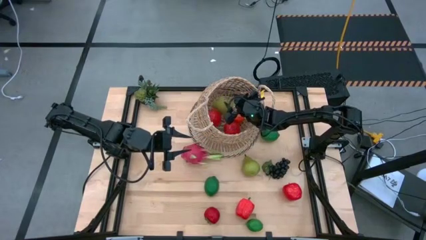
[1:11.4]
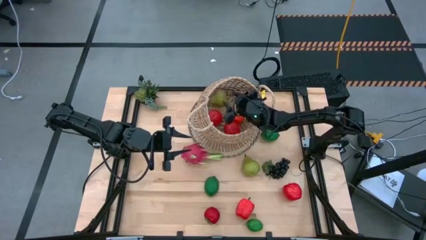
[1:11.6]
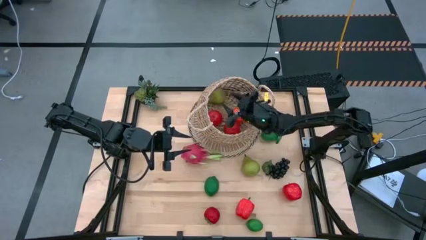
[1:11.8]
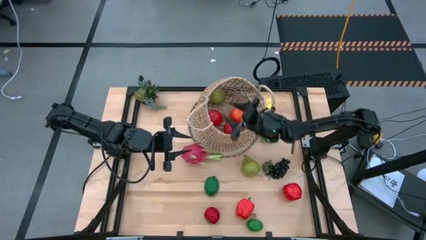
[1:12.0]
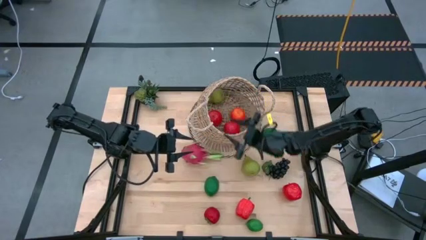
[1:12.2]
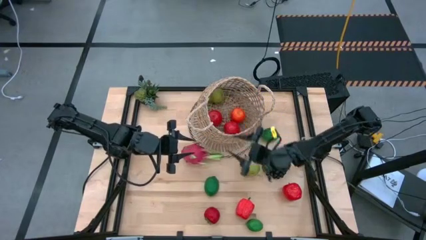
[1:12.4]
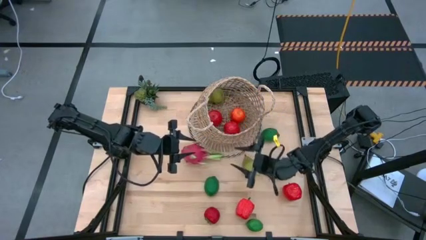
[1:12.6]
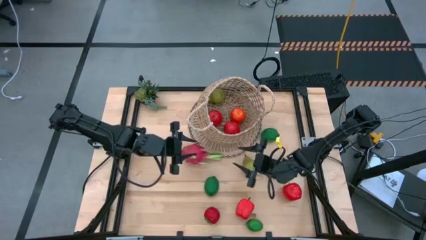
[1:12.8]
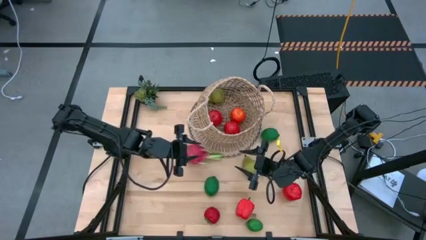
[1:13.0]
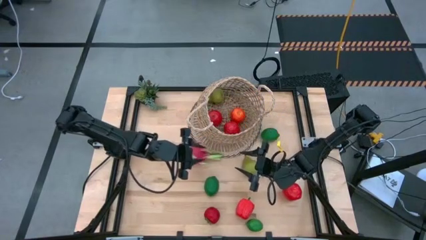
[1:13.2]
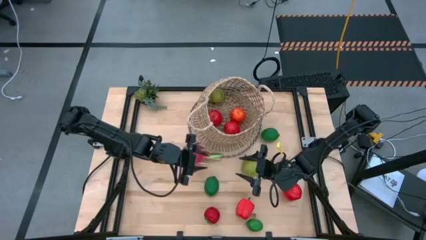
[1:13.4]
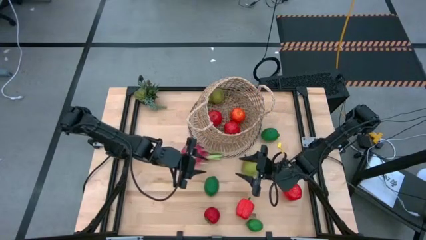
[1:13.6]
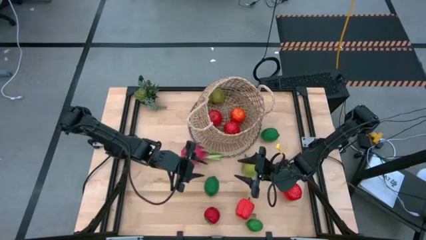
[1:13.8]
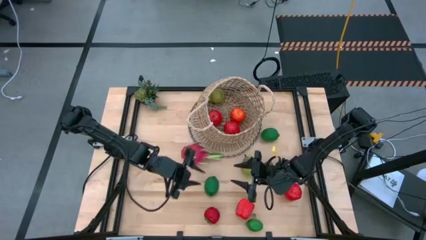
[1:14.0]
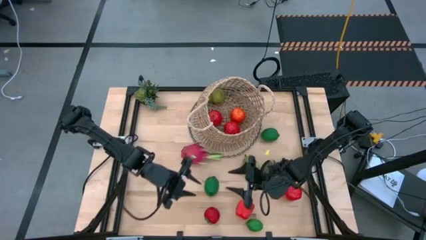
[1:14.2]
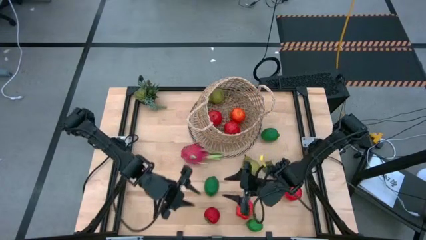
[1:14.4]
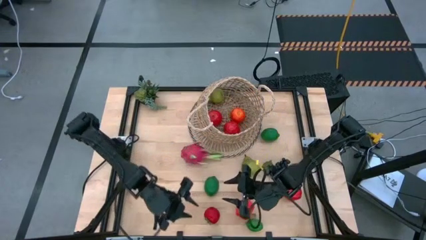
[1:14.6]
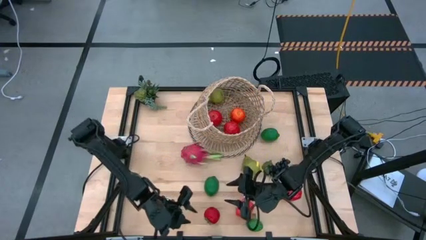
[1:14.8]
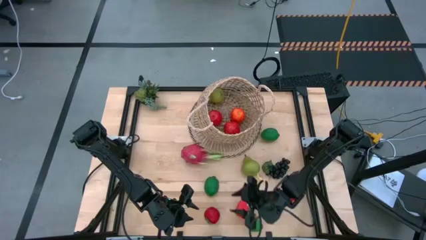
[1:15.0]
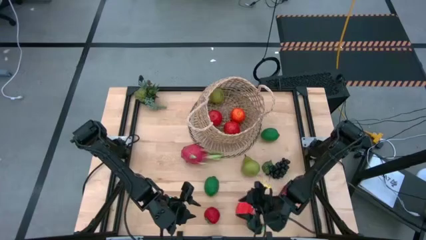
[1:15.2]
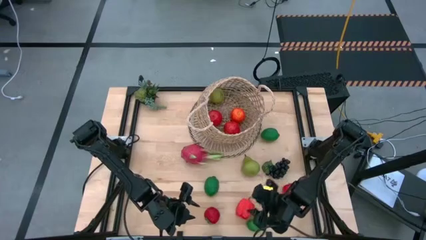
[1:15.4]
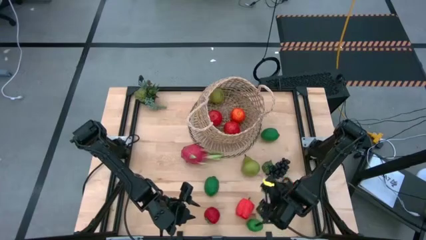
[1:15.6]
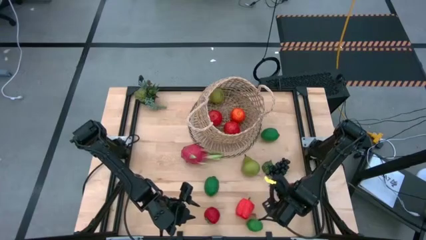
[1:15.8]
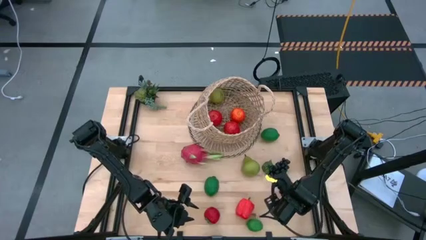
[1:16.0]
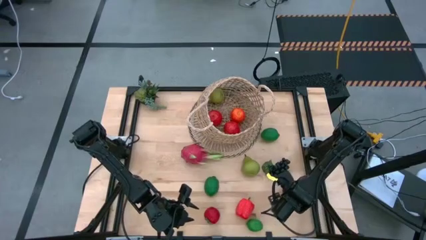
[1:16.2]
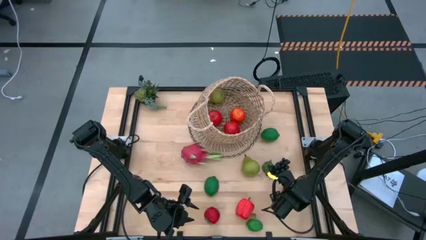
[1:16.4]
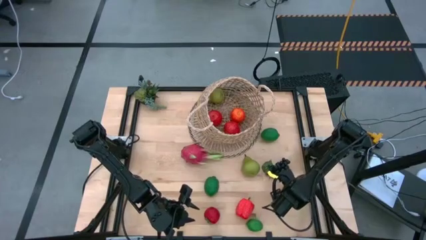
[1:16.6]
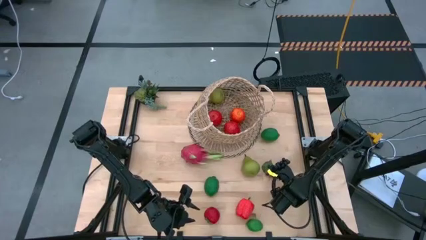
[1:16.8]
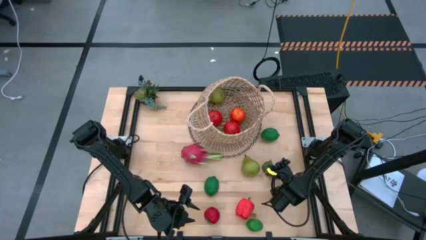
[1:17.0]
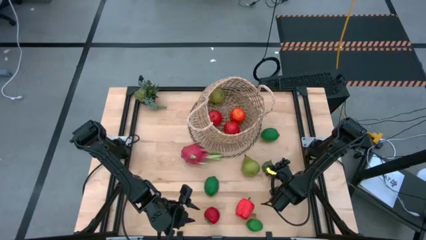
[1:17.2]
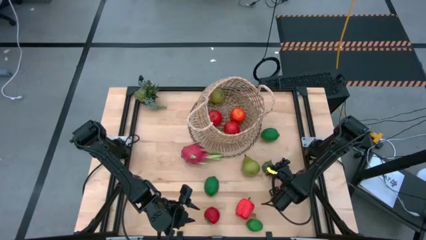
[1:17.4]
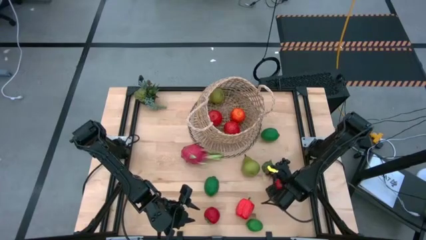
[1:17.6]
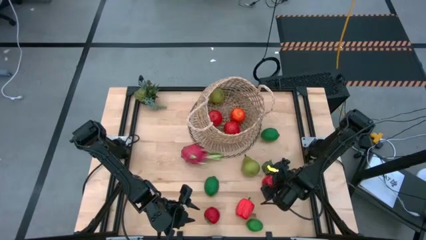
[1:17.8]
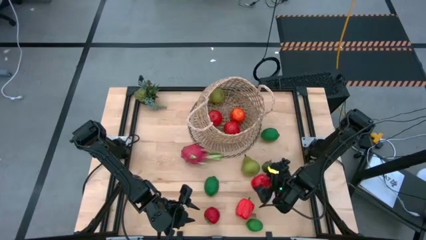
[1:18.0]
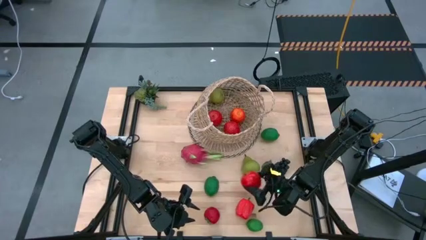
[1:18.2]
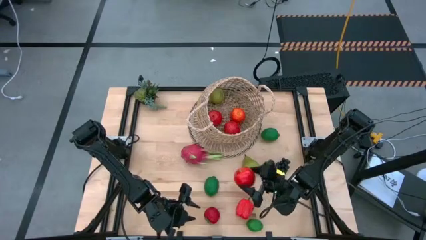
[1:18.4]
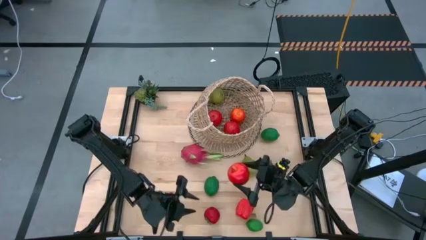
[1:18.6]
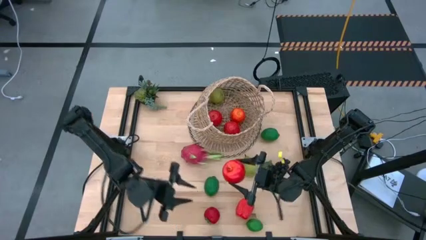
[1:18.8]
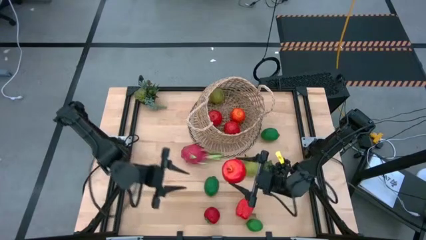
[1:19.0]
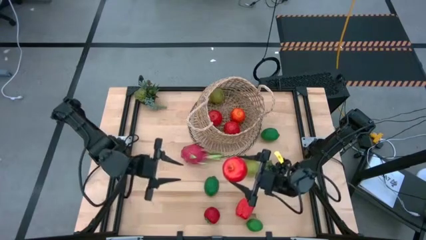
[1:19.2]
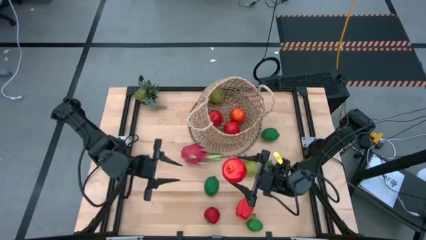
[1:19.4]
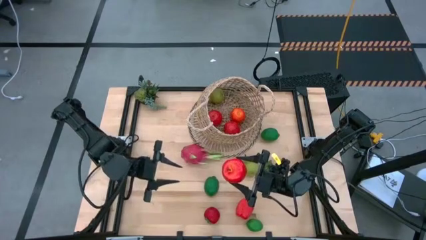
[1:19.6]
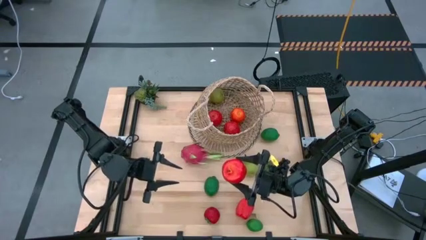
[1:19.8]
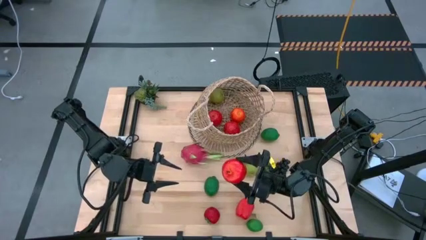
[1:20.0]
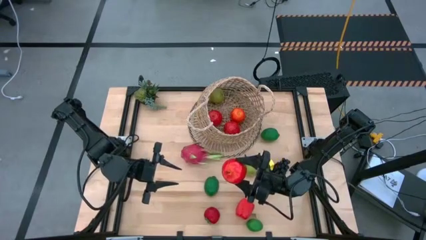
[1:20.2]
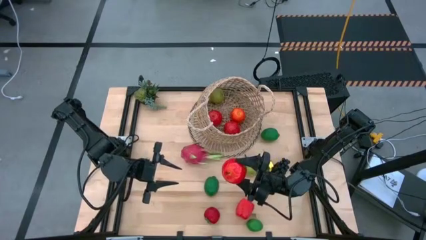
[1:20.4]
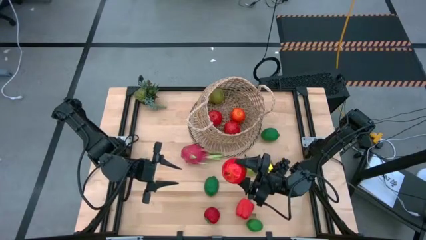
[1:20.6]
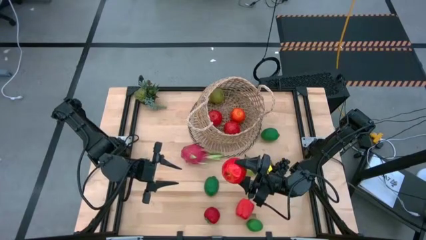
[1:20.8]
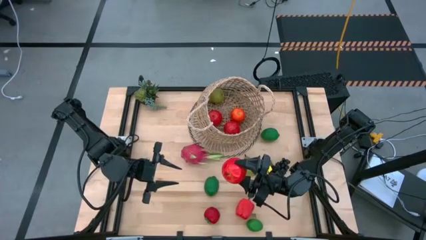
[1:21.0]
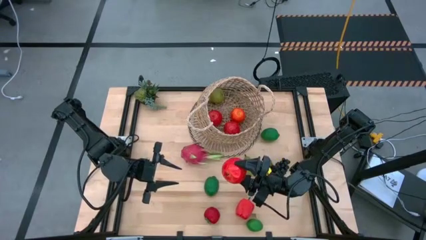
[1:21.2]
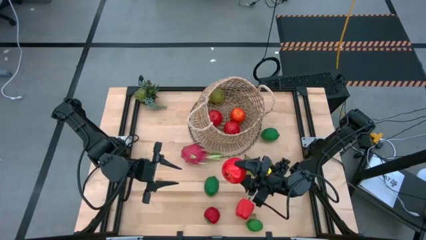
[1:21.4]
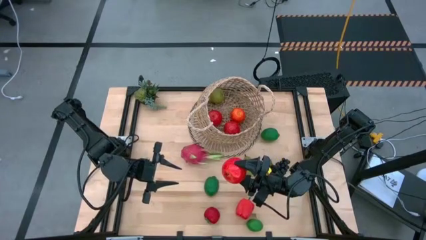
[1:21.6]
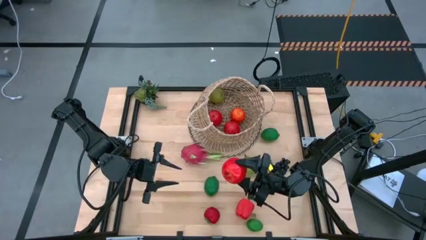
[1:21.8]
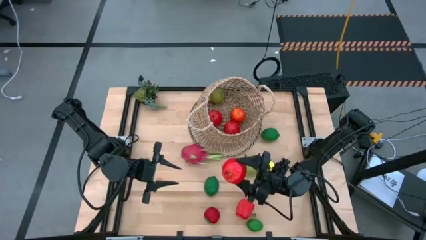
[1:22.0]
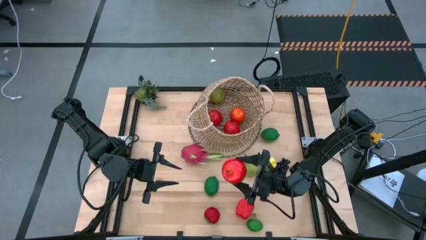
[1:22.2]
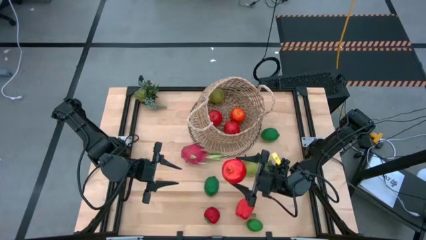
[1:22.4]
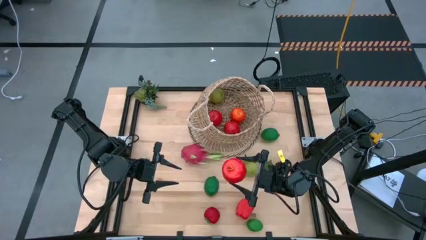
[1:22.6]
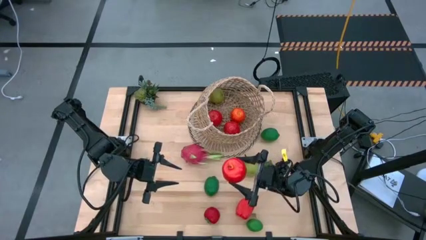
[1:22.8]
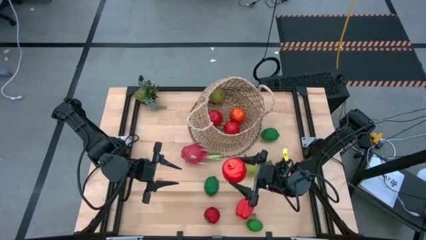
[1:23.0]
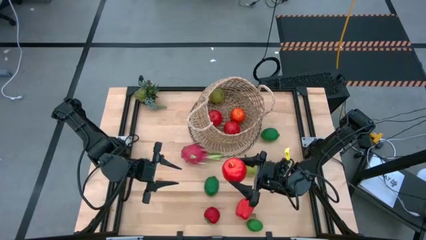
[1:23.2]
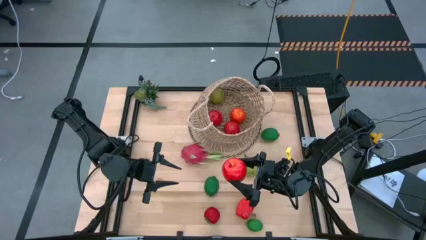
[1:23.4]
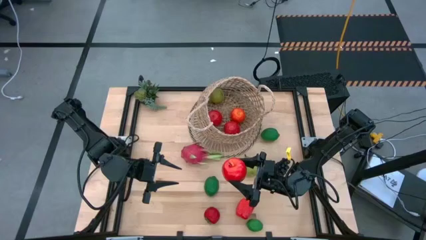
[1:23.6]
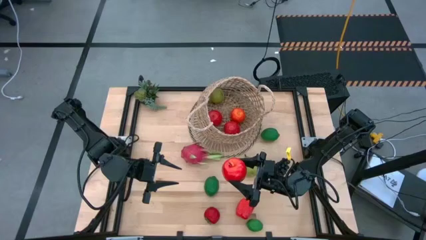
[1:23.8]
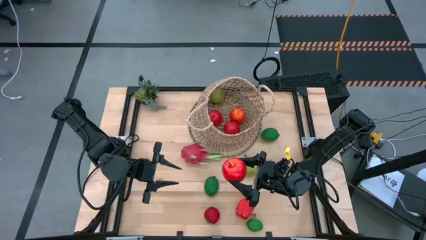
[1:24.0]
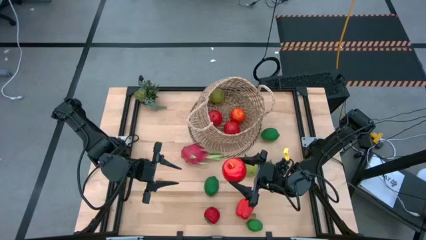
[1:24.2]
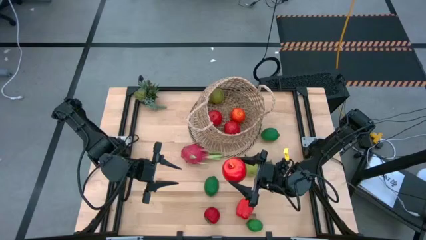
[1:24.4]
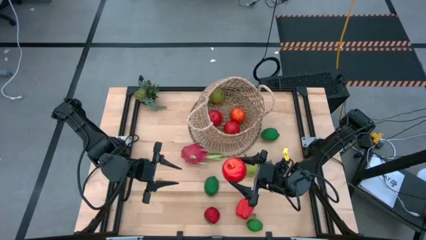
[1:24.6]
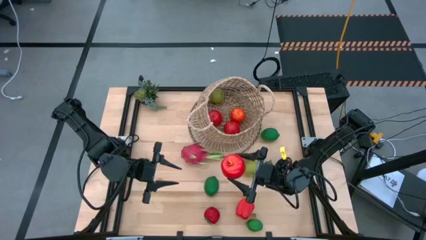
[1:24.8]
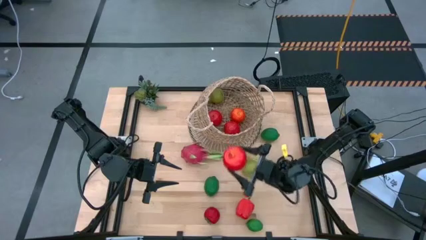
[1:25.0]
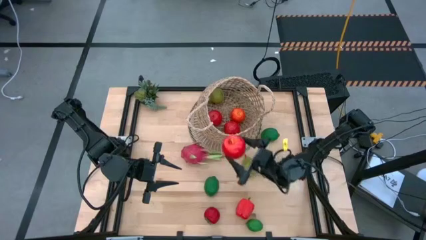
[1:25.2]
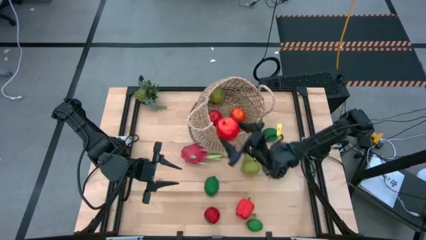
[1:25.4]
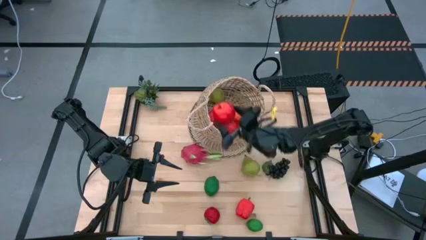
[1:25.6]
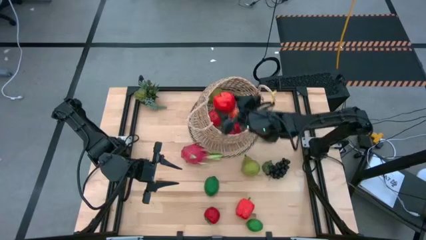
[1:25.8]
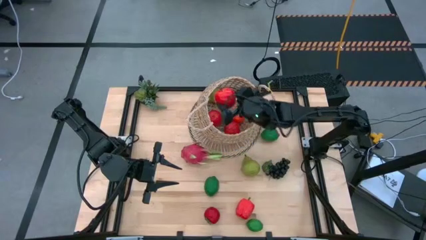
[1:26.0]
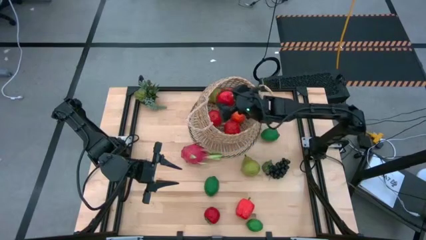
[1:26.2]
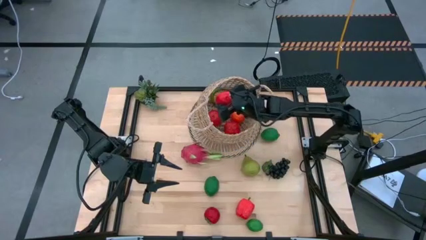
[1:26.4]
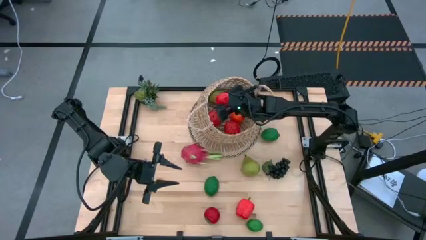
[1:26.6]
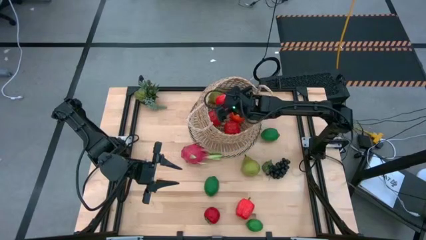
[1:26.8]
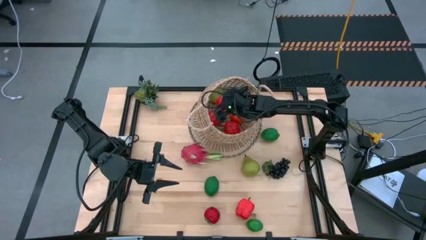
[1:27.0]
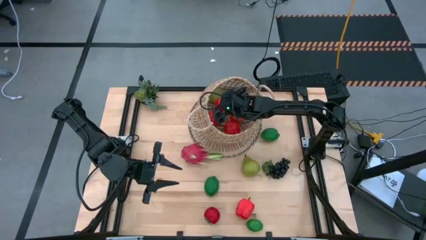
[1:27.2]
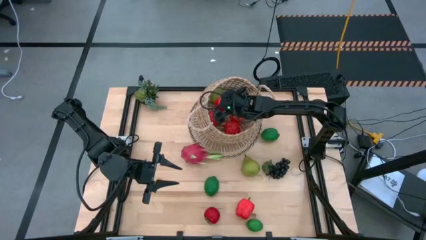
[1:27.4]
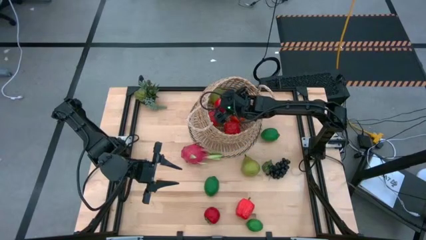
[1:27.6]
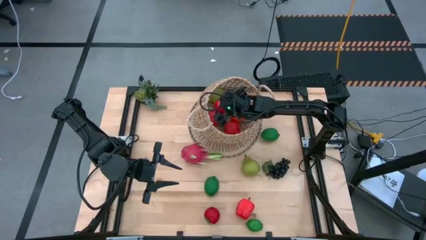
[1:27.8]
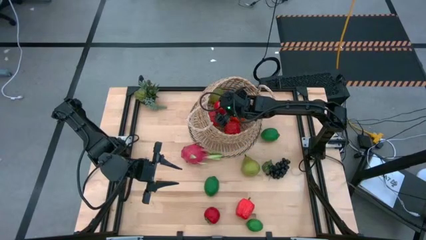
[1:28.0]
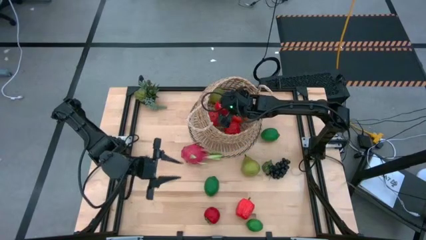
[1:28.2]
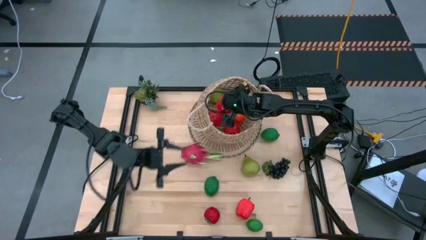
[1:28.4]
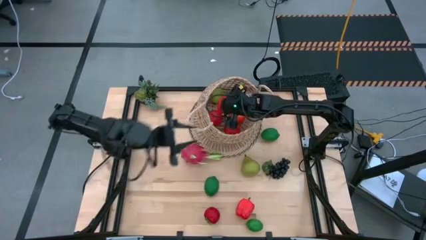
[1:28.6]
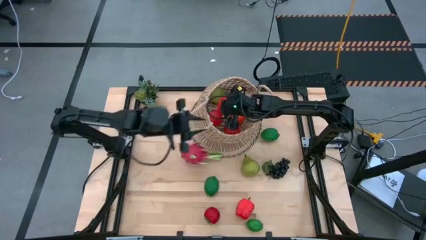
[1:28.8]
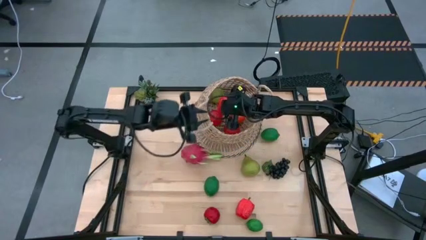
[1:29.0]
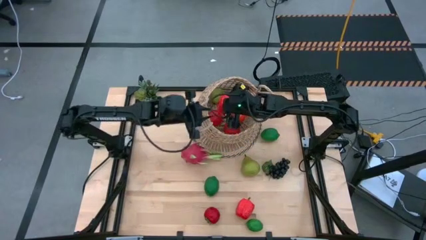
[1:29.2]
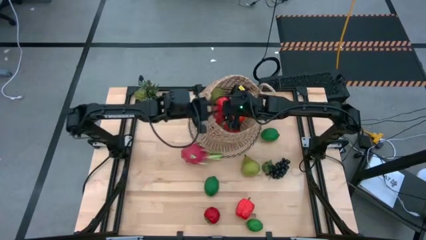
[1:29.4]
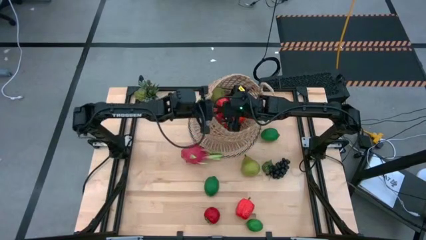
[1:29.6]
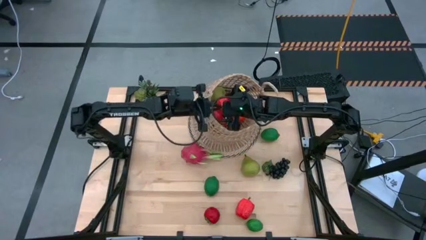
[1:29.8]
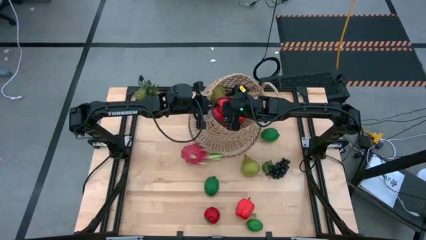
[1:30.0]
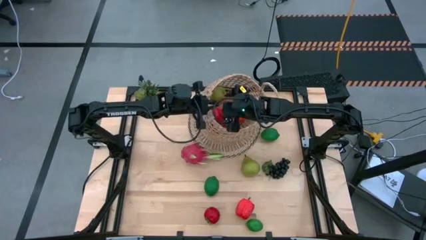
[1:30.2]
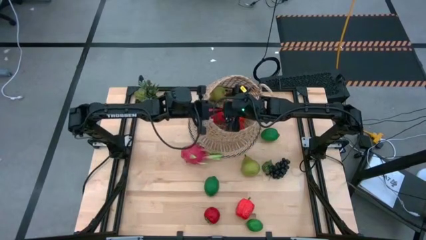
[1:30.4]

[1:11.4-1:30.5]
Task: Build produce basket
Put the red apple into the basket
